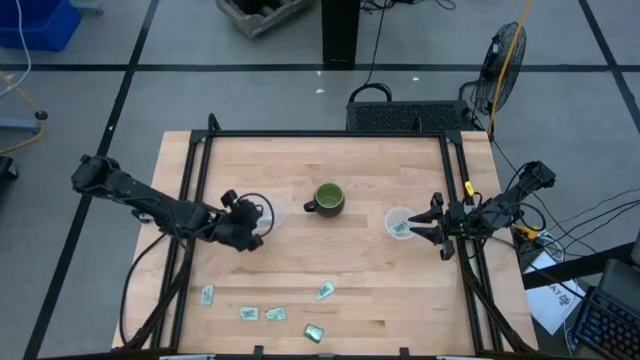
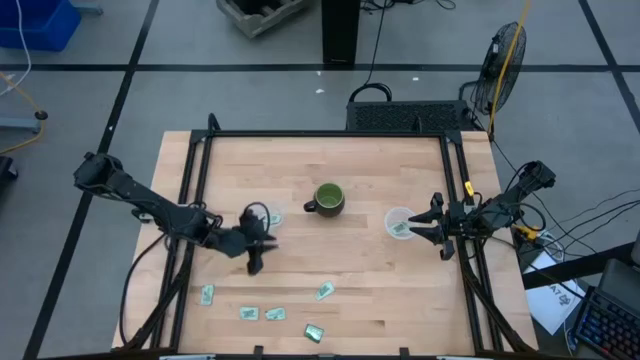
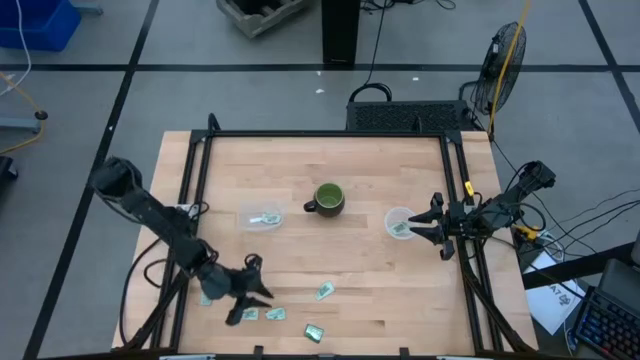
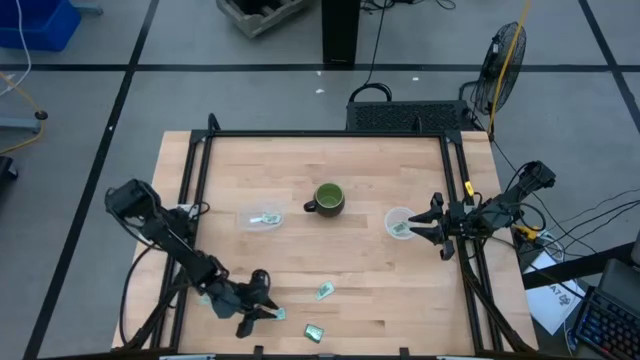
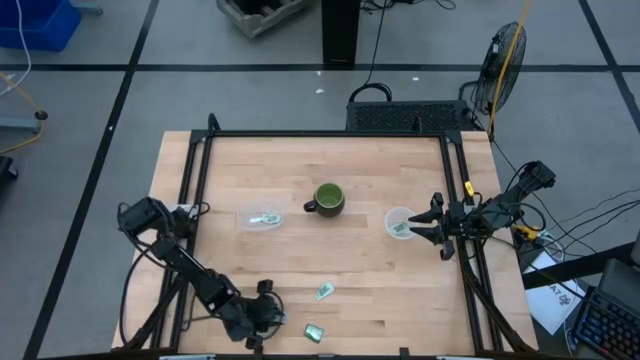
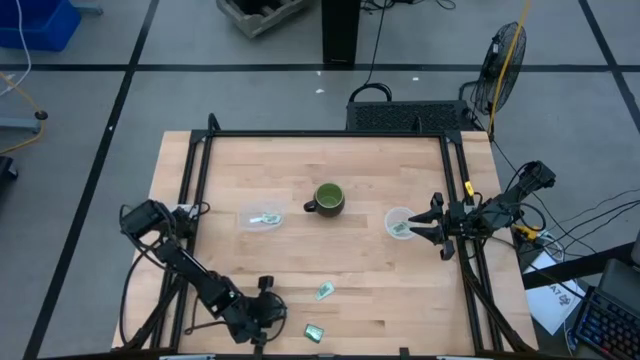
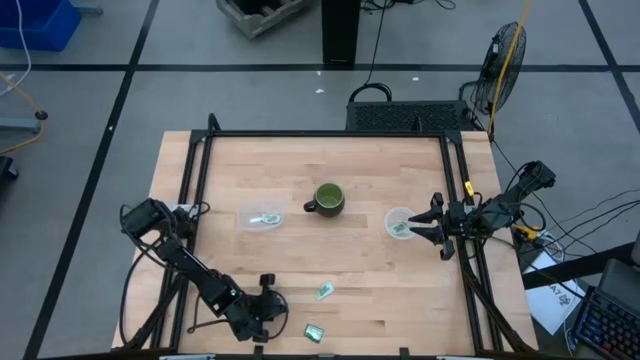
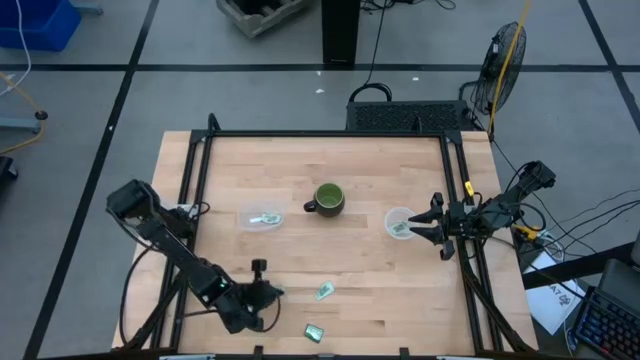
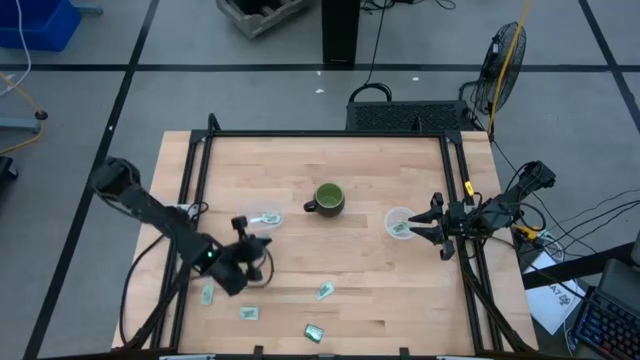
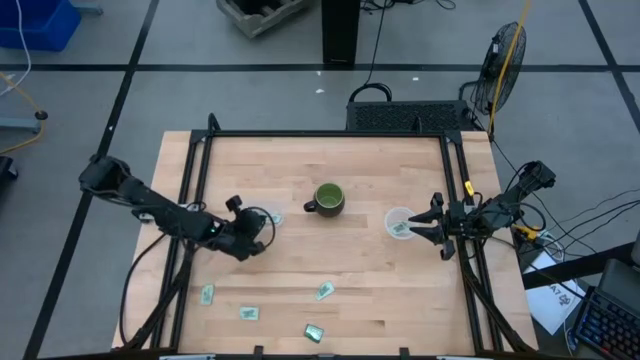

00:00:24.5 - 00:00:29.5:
Task: Pick and place Stevia / Truvia into bins
Put the stevia packet into the oval transparent container

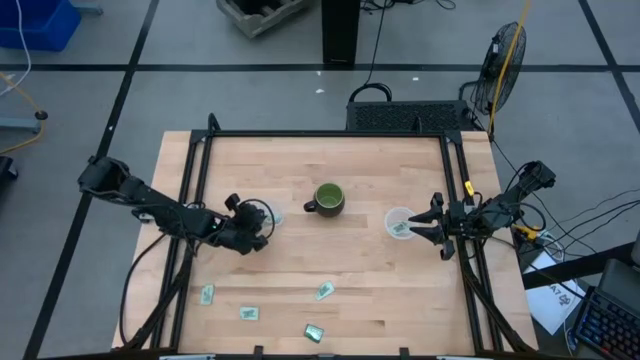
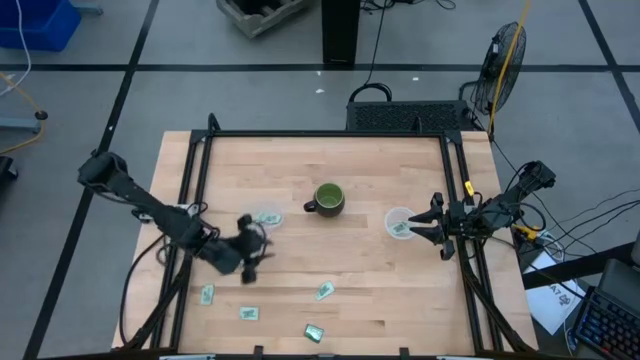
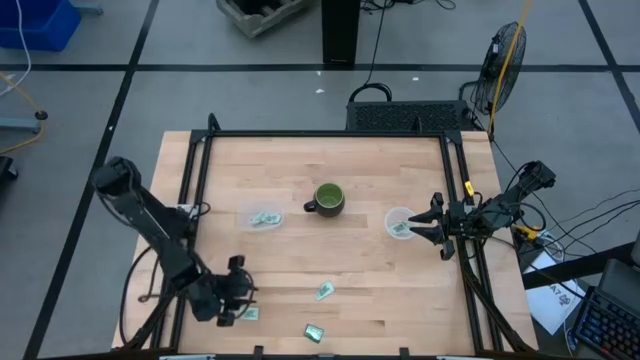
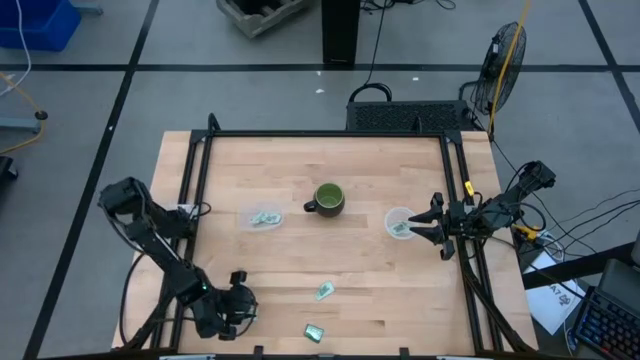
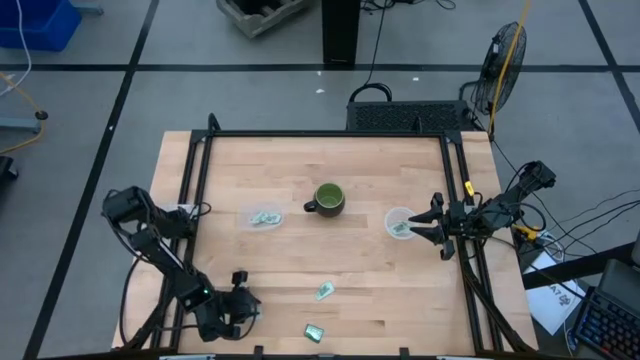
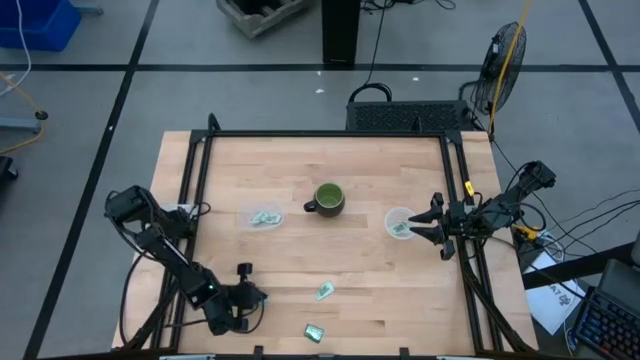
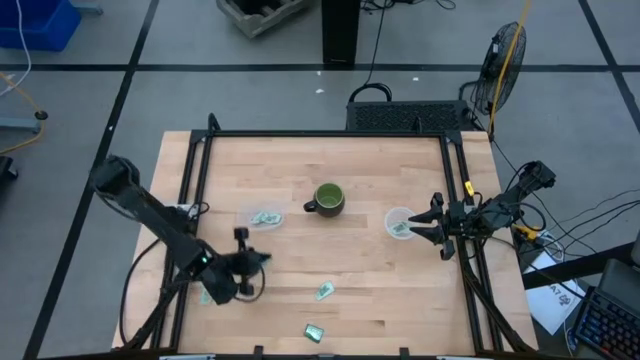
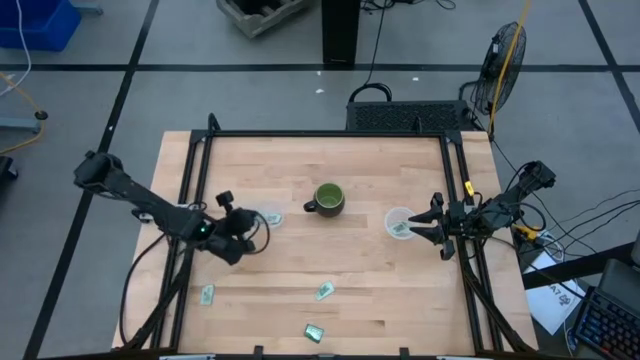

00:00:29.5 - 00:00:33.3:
Put the stevia packet into the oval transparent container

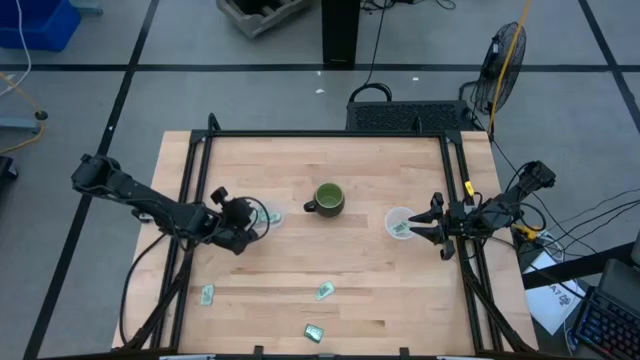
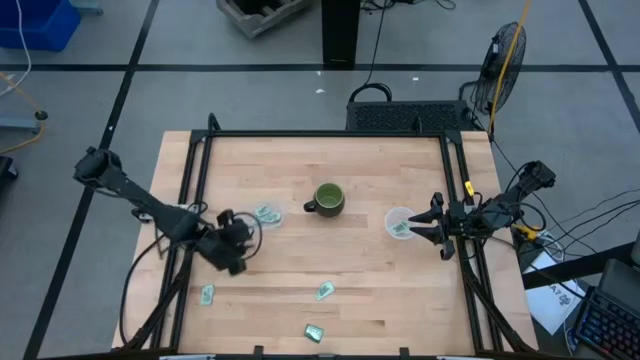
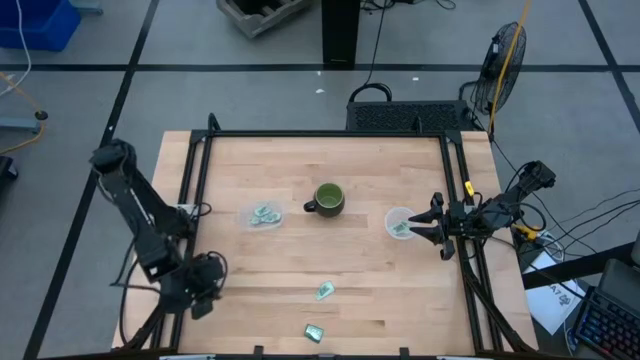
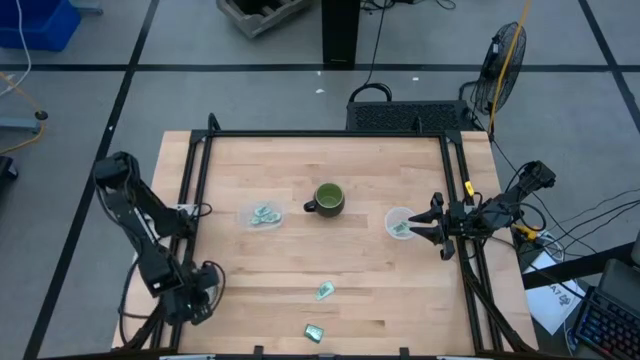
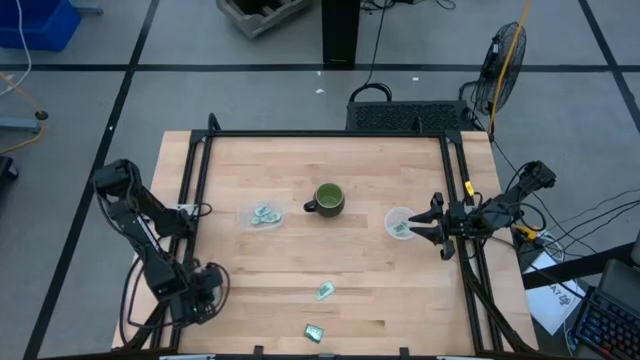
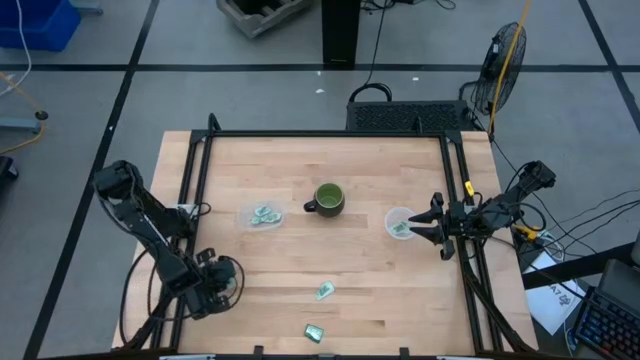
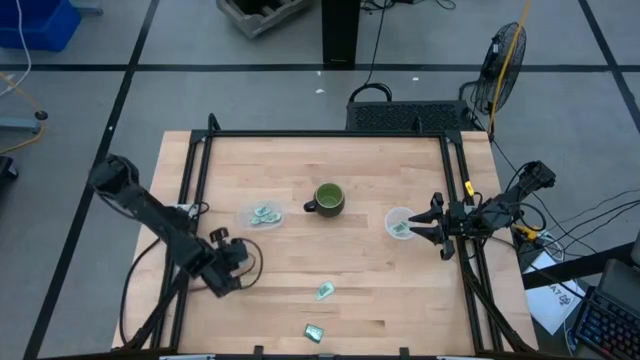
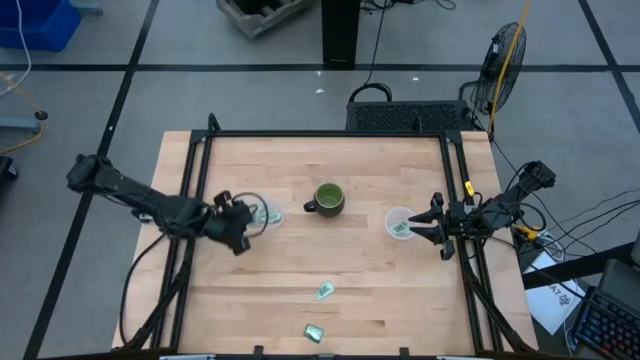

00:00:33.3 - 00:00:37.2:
Put the stevia packet into the oval transparent container

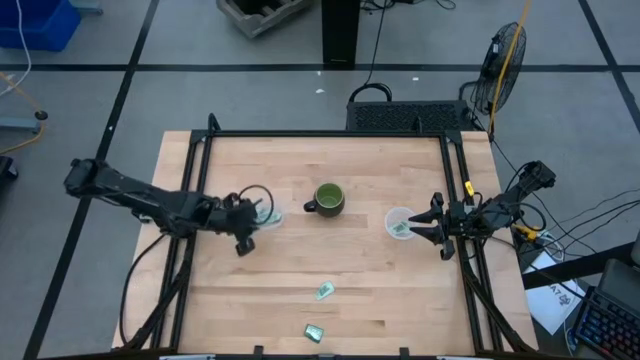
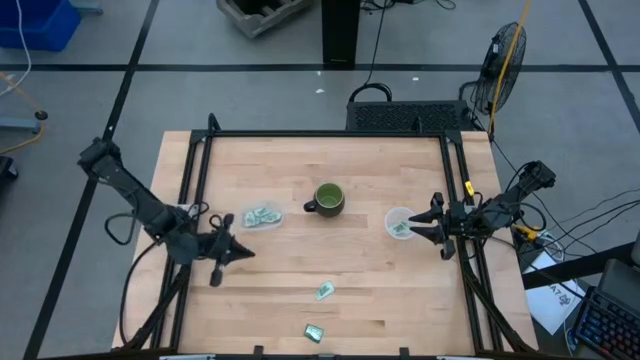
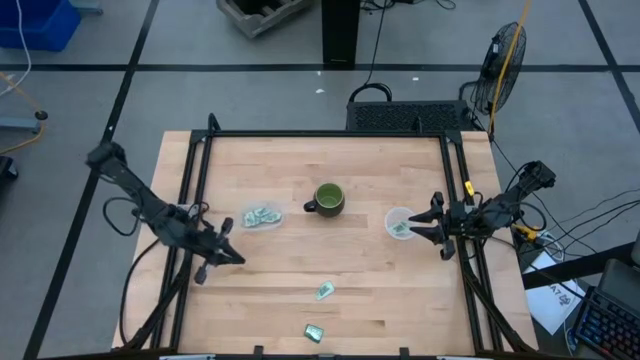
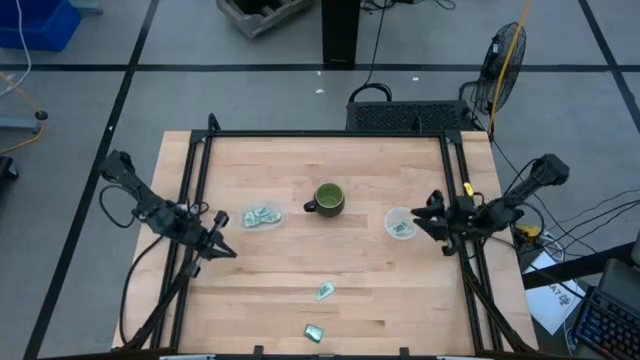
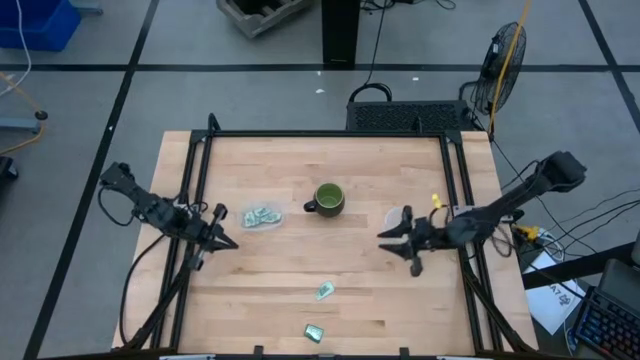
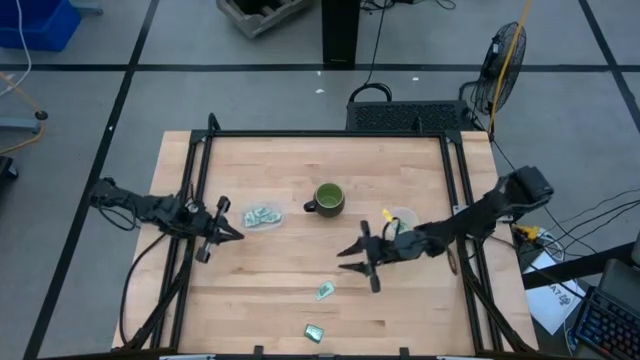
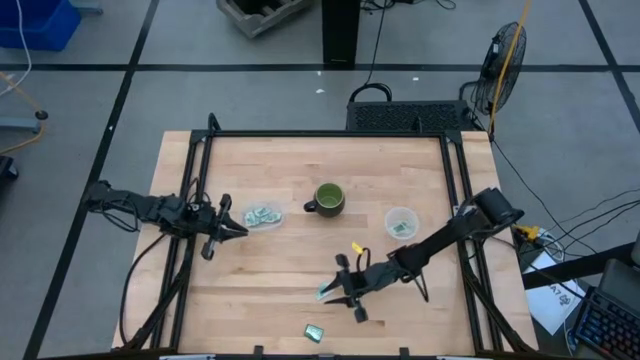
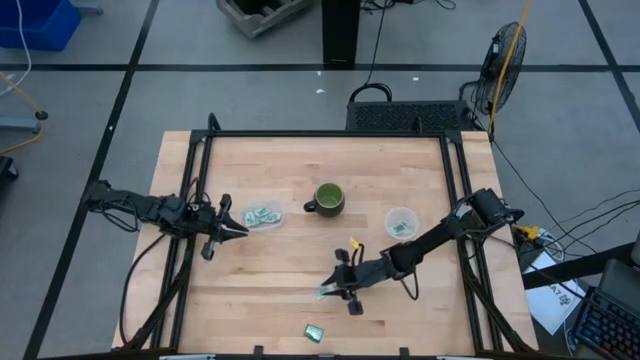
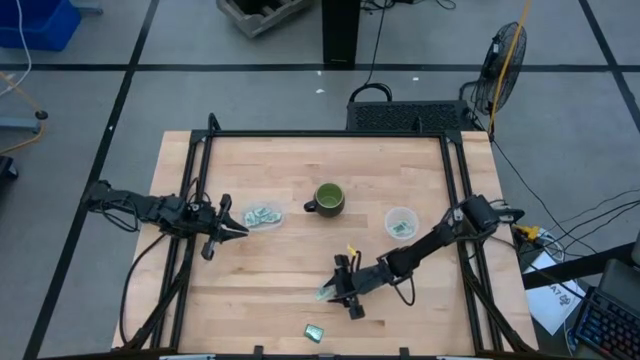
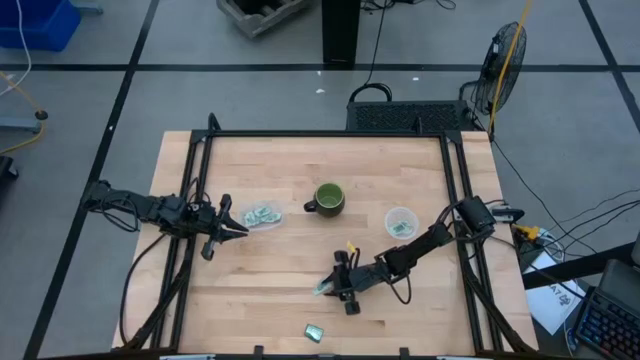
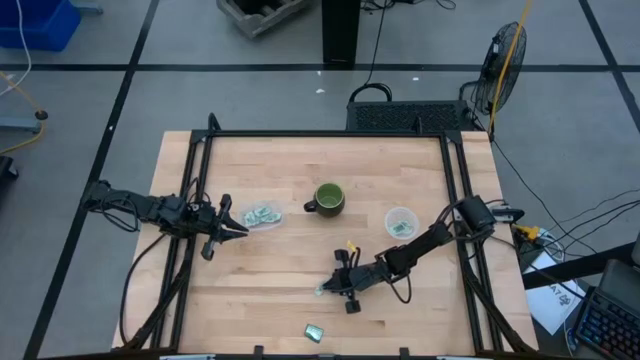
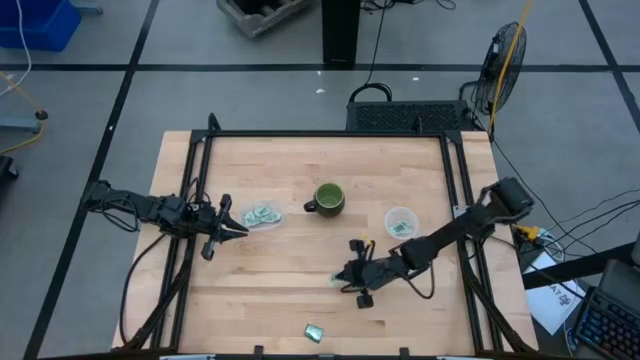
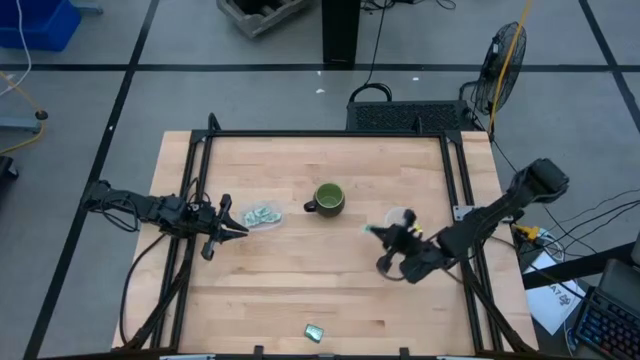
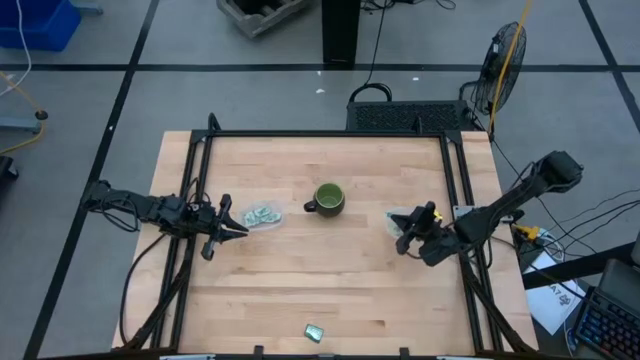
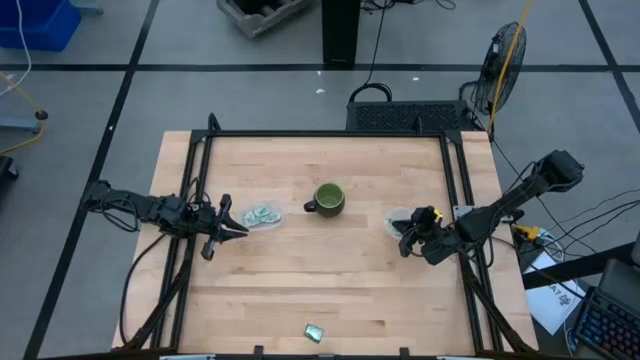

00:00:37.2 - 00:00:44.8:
Put the stevia packet into the round transparent container
